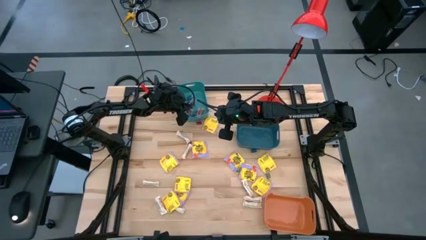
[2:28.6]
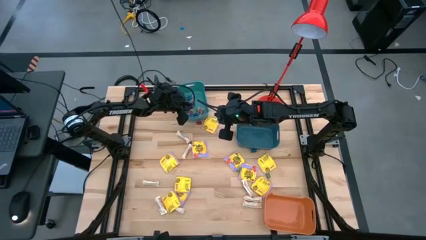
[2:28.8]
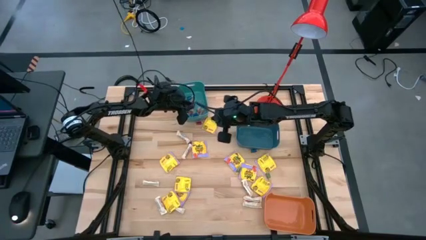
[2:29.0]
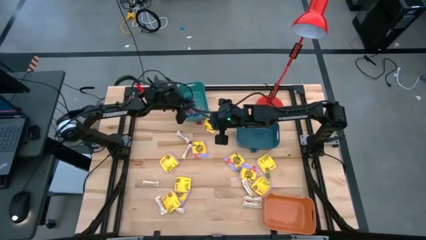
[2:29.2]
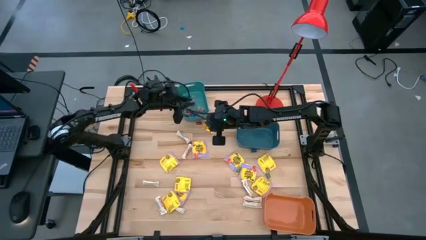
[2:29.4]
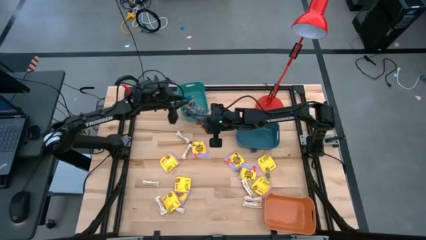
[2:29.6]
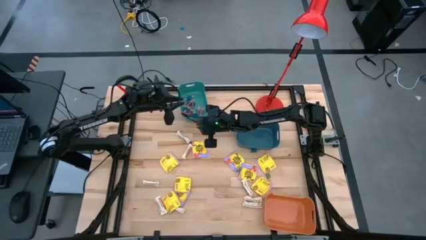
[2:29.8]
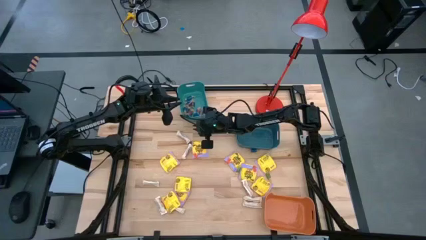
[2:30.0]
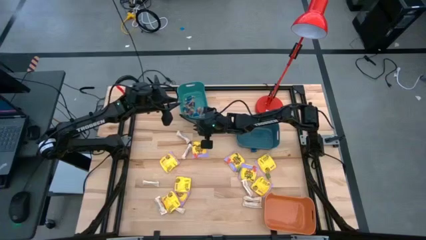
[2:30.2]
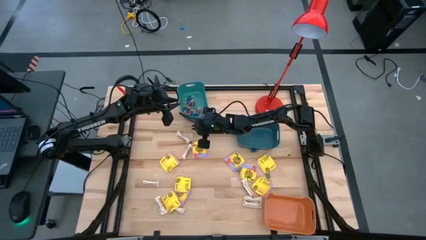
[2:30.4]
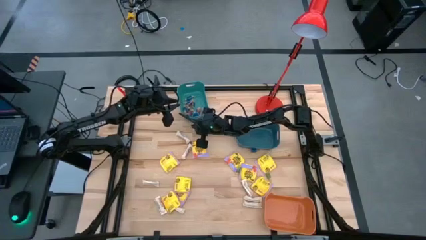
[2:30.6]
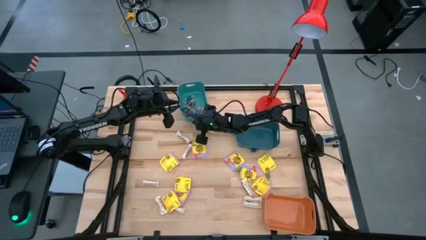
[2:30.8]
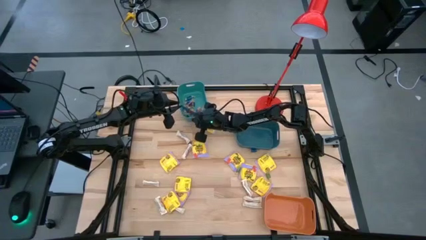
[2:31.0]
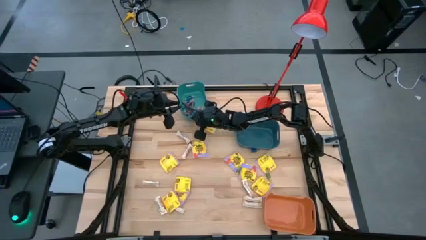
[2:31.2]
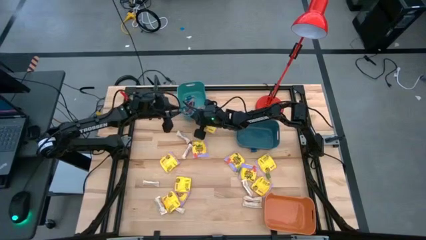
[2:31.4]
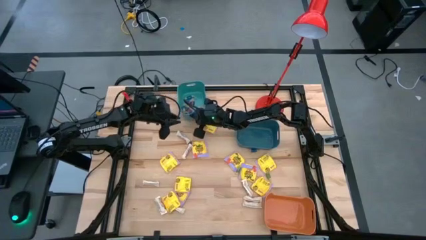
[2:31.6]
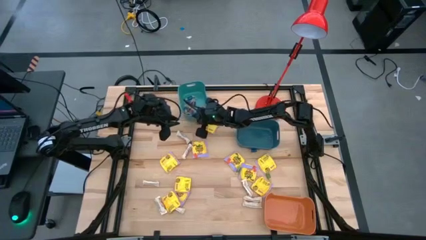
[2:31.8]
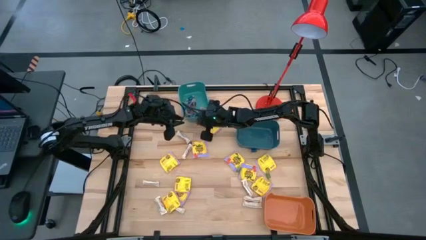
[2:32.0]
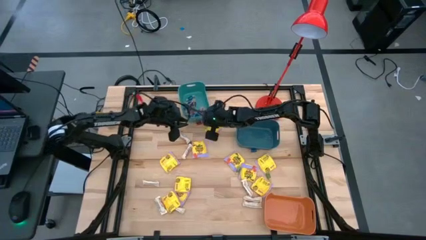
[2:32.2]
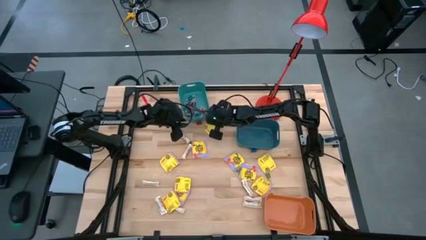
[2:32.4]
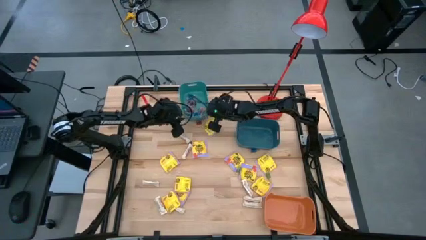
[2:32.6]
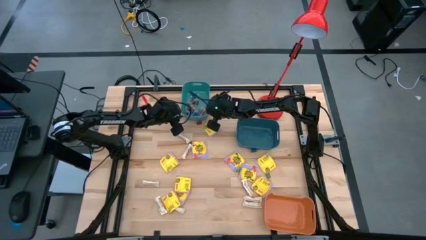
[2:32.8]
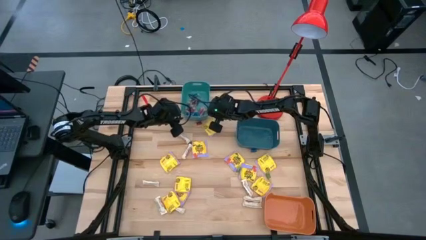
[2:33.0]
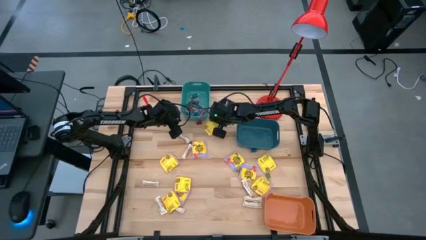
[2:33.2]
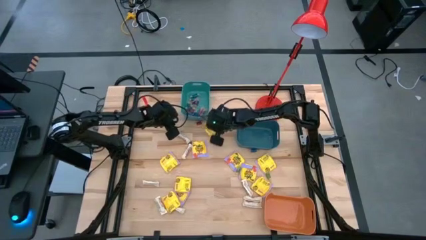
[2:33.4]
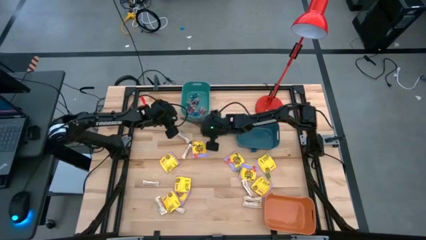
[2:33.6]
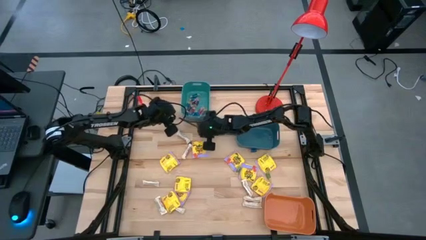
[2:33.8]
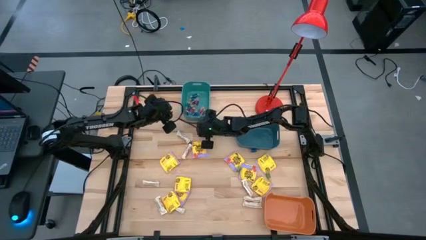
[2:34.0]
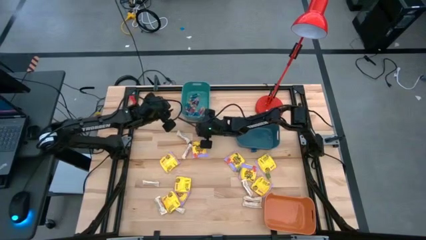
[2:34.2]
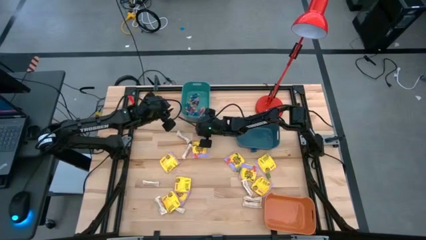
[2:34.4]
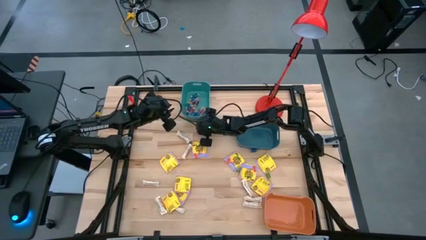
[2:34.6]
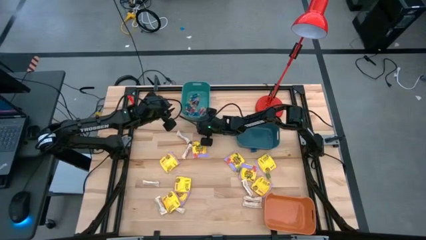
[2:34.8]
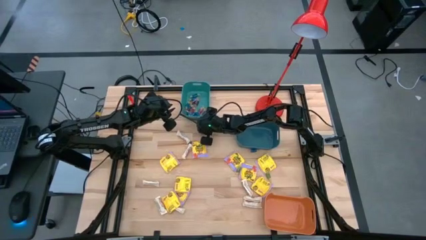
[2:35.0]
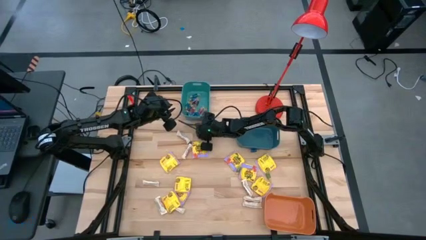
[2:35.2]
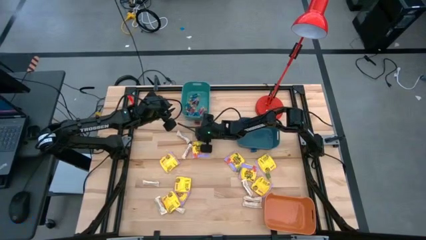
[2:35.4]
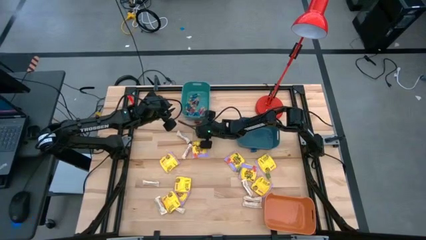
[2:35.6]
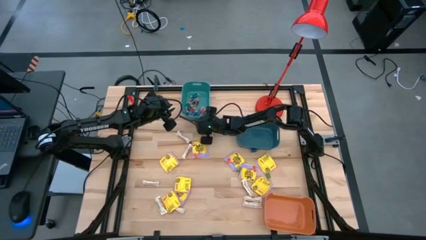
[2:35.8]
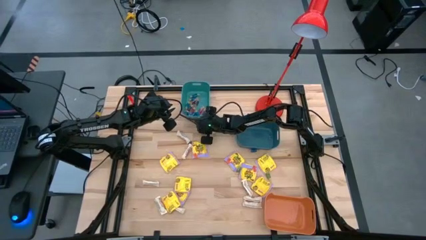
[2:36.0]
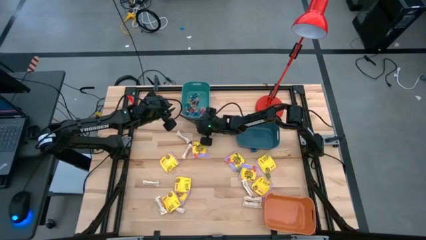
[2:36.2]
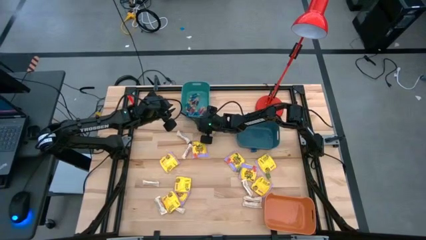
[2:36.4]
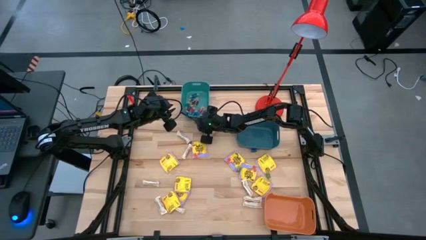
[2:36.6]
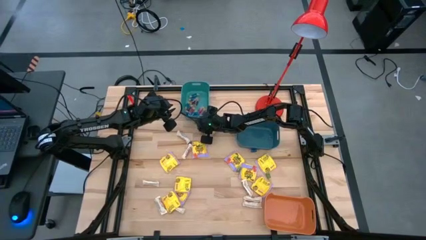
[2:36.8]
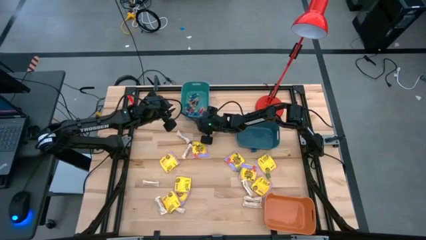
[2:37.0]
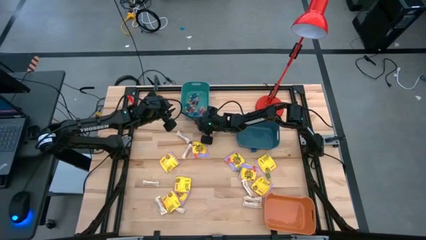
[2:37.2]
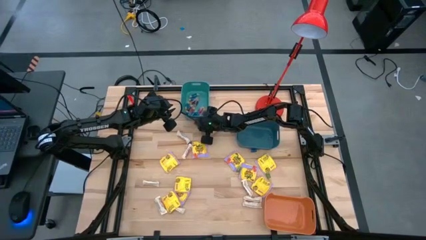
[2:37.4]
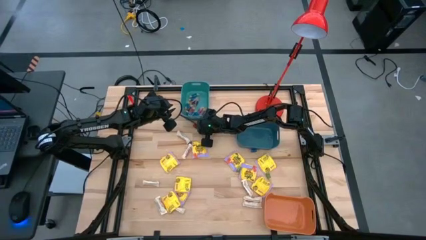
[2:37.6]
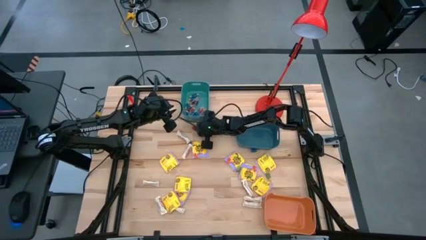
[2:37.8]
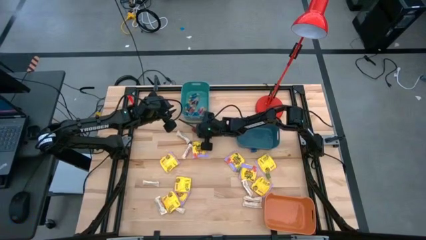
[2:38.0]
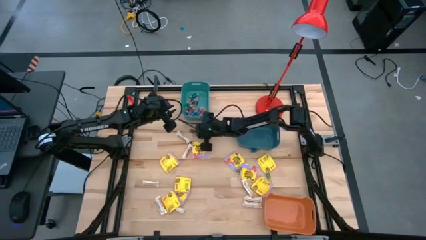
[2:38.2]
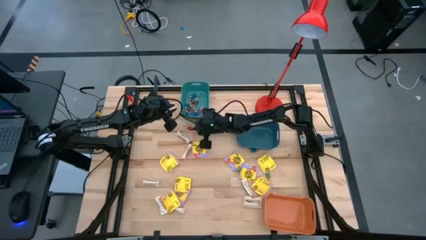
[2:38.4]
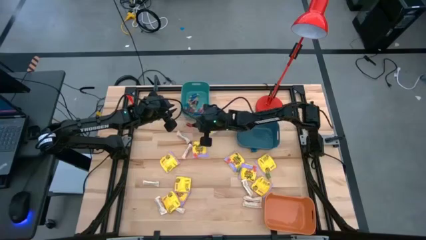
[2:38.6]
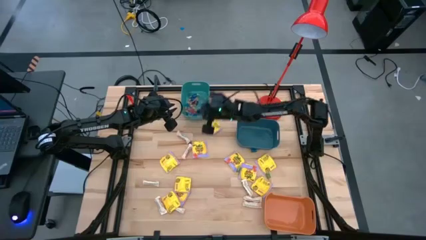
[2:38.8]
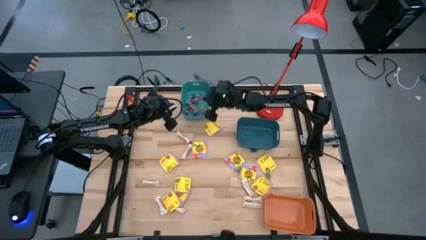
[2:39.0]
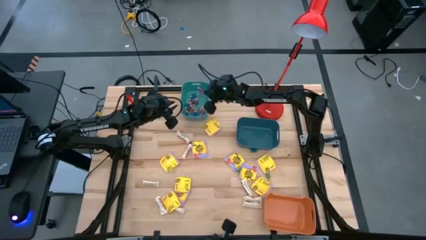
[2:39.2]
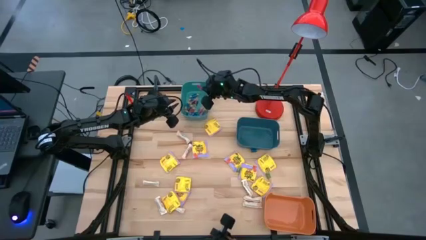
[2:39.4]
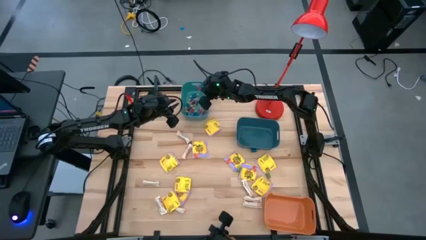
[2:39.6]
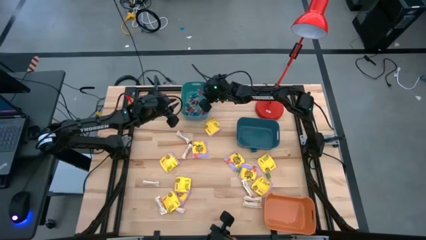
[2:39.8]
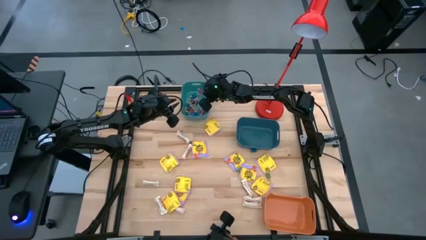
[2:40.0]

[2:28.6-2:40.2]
Task: Sort candy
Put the red candy into the green bin
